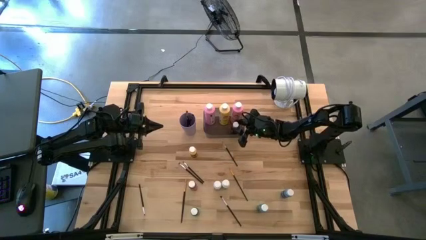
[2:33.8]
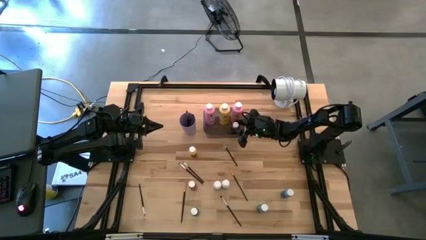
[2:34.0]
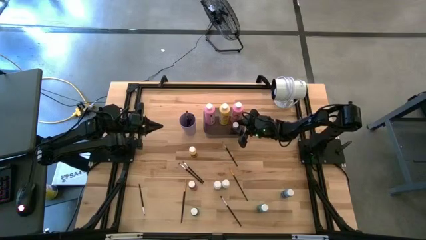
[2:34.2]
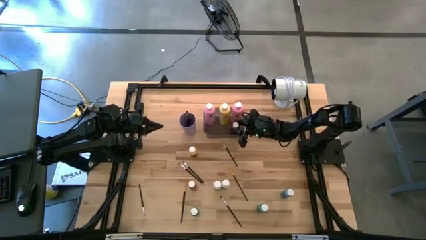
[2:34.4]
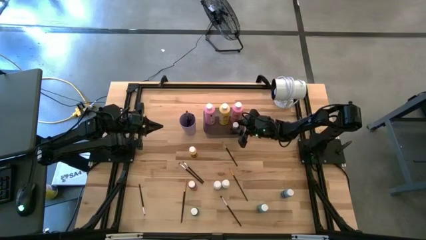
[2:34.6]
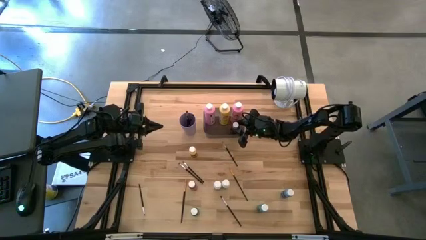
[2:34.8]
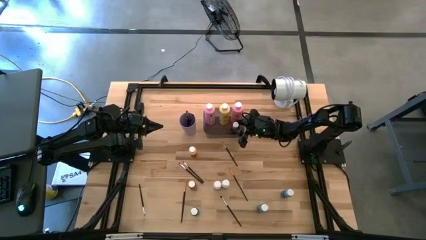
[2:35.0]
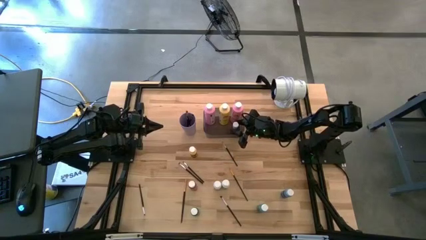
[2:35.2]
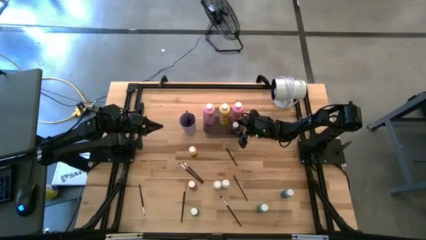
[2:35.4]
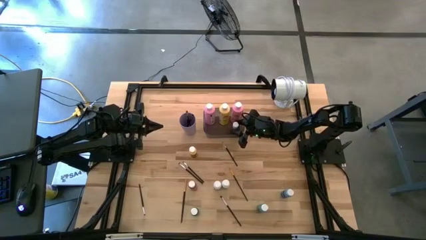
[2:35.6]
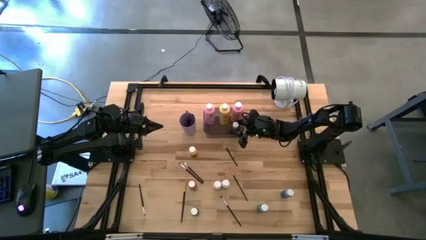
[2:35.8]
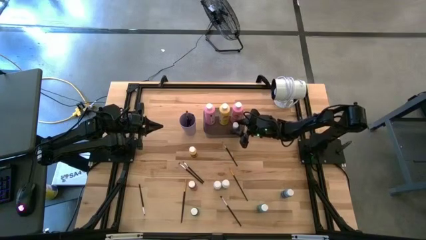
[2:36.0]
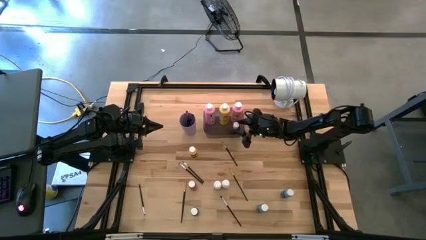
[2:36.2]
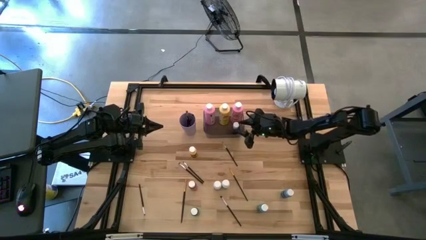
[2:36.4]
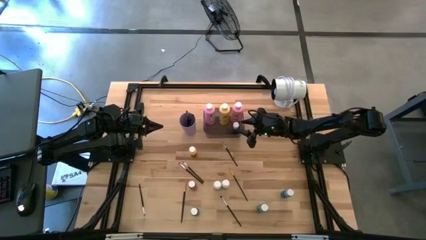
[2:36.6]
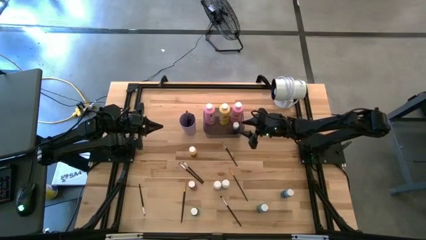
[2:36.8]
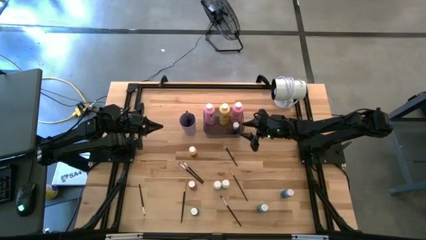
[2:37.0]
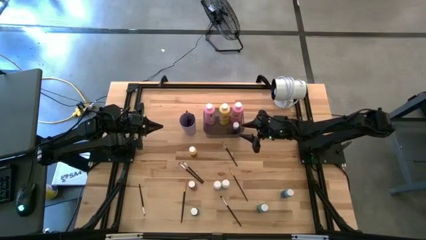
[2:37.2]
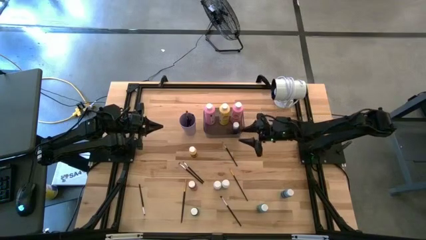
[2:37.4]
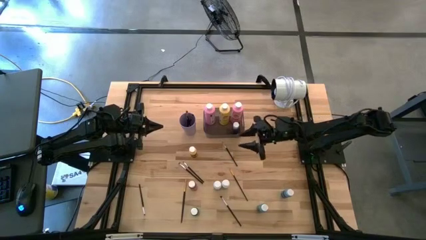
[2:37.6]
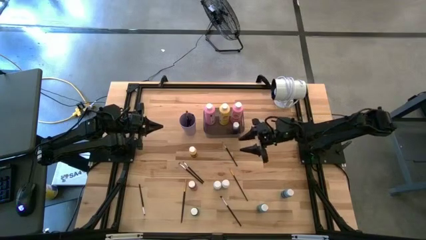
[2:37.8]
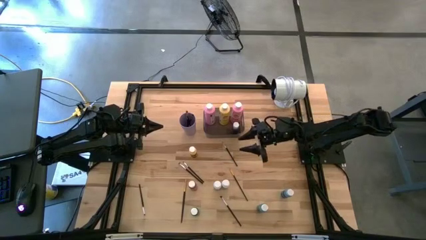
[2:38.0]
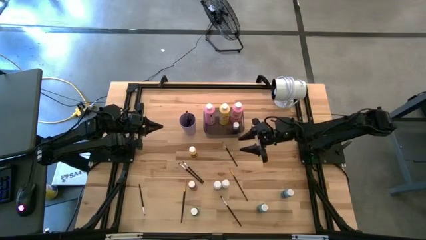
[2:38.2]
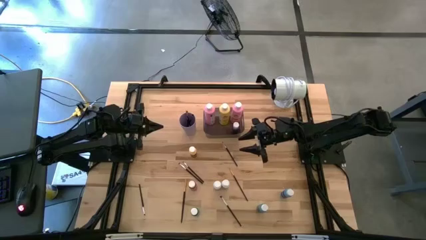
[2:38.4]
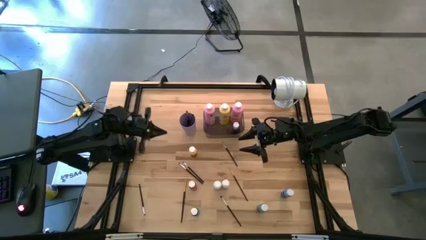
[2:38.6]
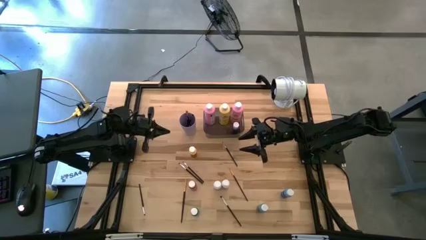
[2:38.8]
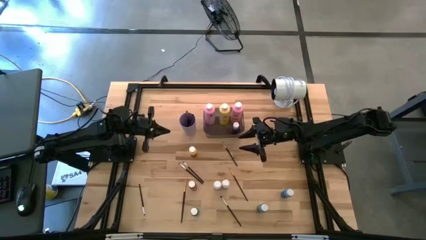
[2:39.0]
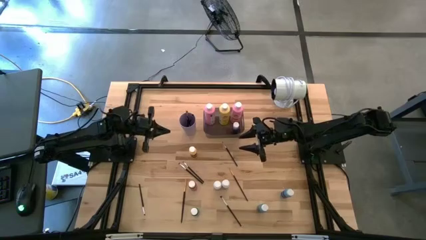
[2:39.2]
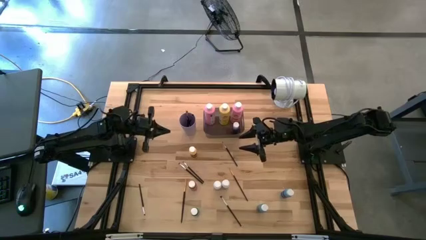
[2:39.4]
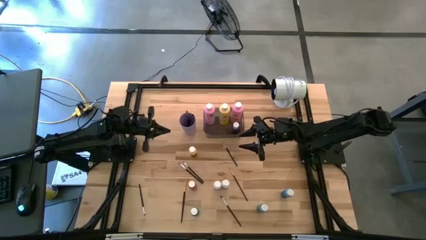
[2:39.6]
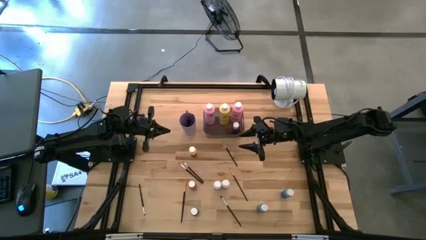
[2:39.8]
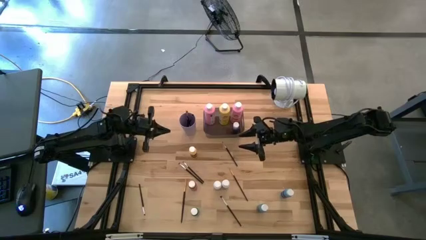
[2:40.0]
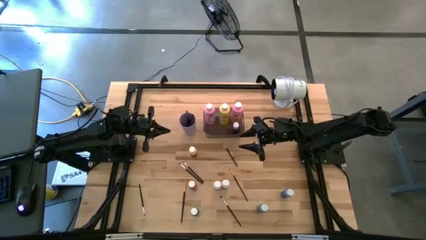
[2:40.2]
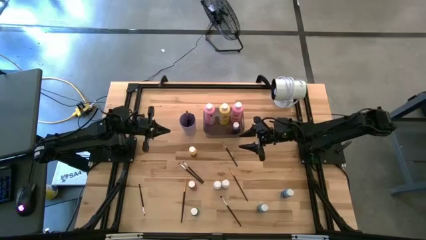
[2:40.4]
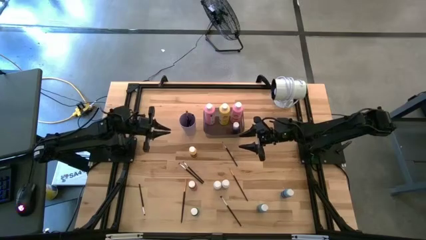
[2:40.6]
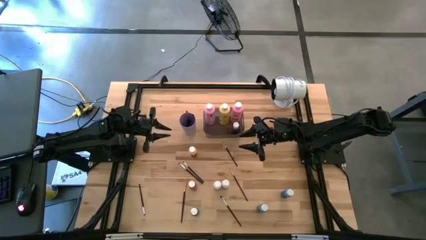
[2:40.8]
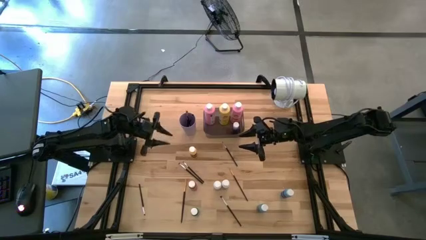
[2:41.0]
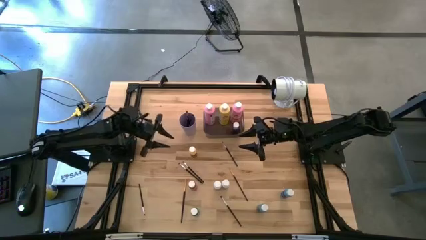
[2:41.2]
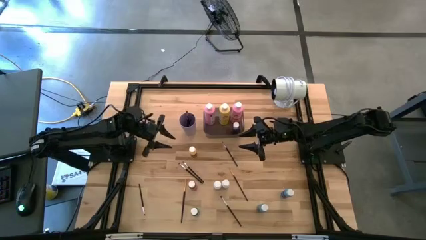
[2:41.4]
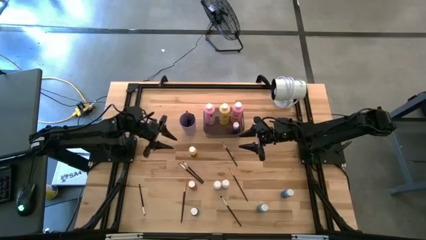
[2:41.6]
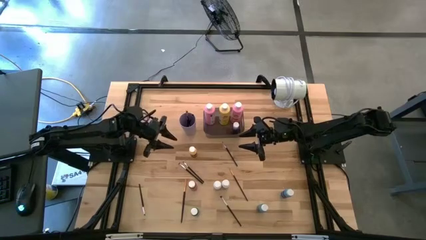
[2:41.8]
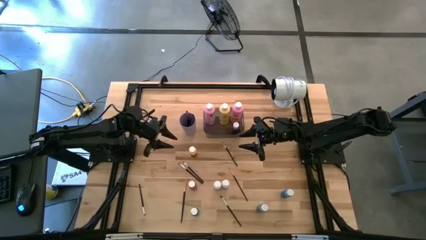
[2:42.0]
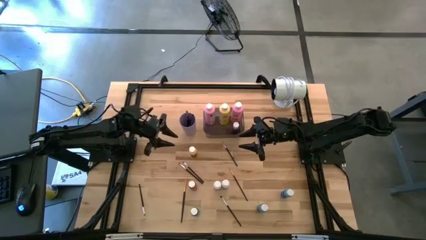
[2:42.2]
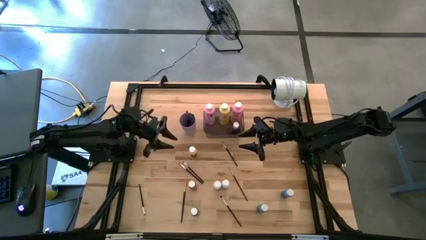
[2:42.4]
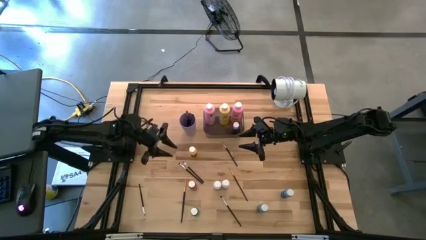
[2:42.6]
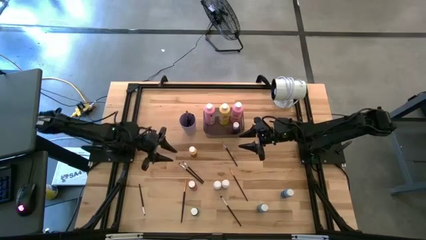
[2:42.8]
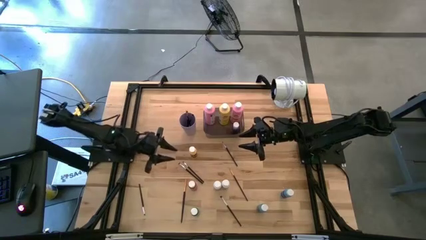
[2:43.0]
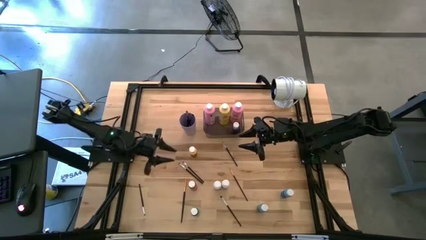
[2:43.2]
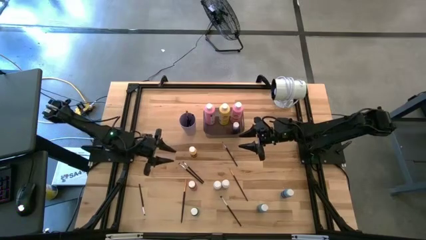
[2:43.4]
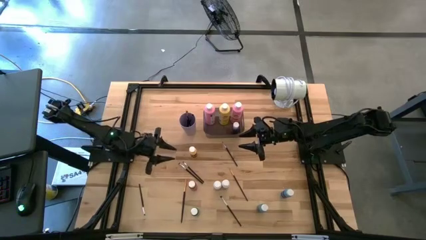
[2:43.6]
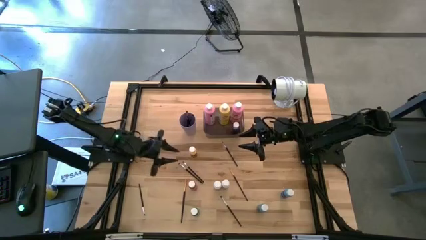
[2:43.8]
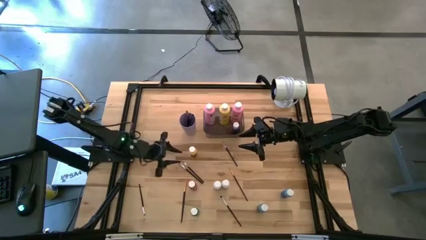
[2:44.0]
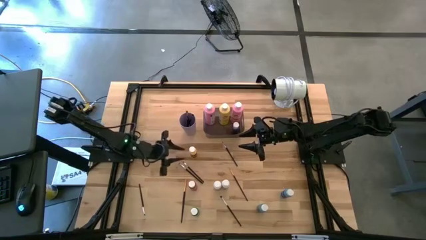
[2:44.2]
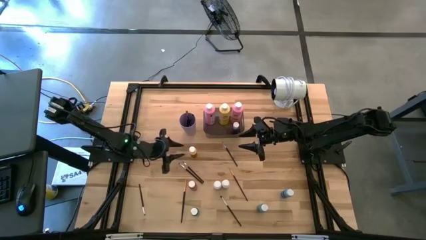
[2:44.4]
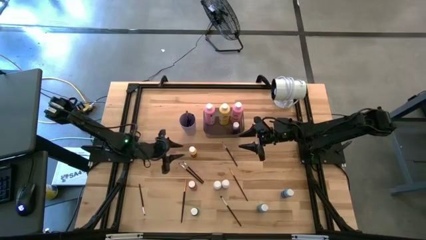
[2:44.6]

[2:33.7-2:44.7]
Task: Pick & Place Paint Supplies
Put the small yellow paint bottle into the gray bin

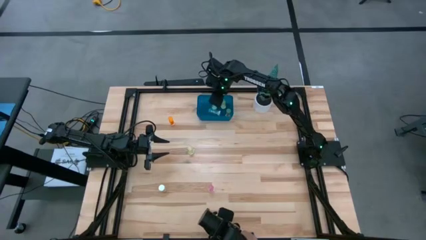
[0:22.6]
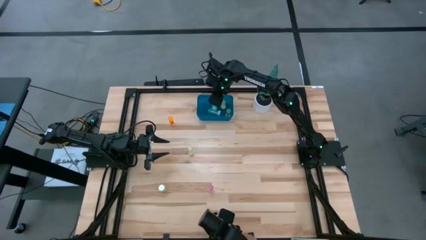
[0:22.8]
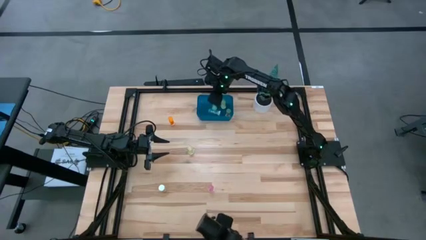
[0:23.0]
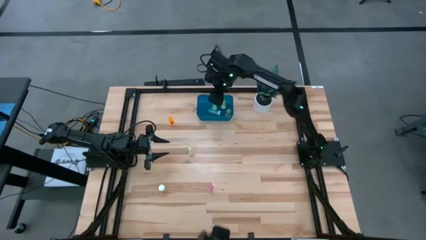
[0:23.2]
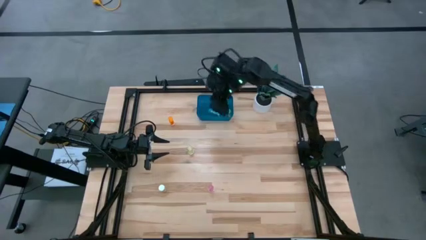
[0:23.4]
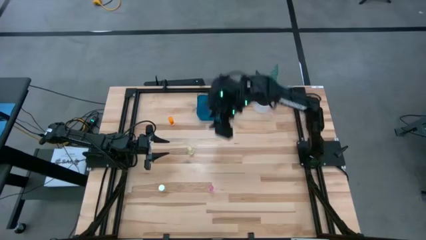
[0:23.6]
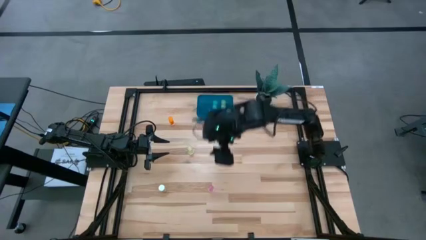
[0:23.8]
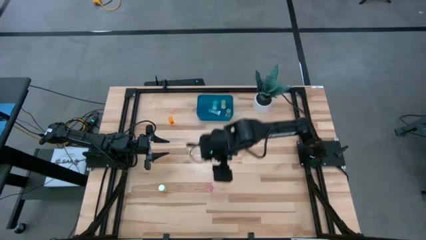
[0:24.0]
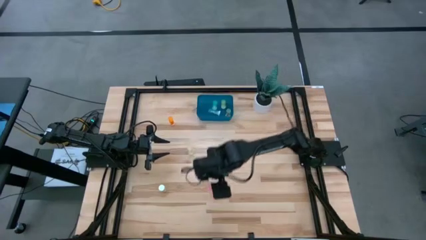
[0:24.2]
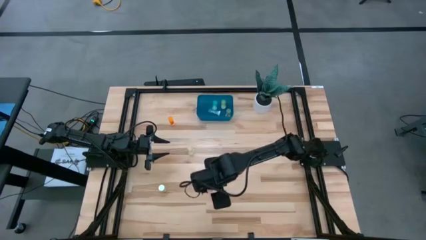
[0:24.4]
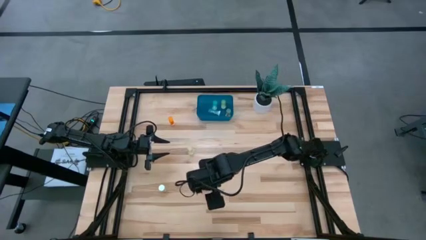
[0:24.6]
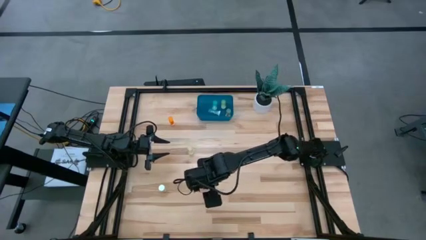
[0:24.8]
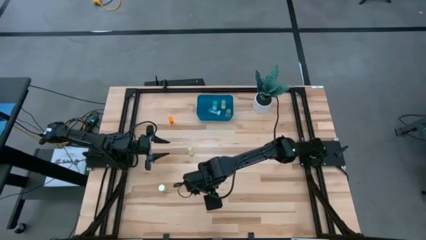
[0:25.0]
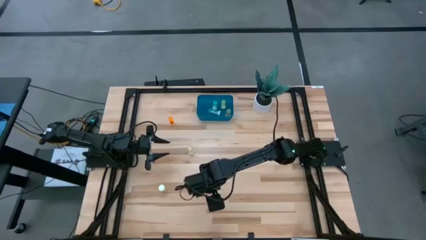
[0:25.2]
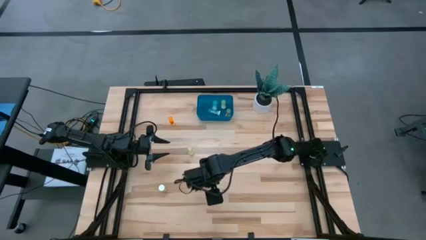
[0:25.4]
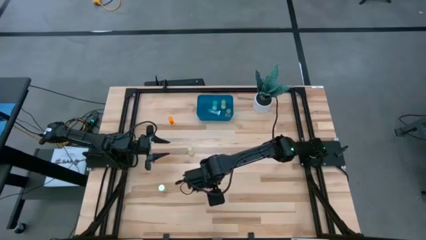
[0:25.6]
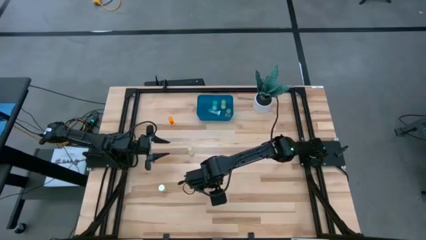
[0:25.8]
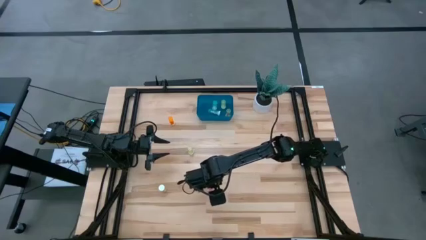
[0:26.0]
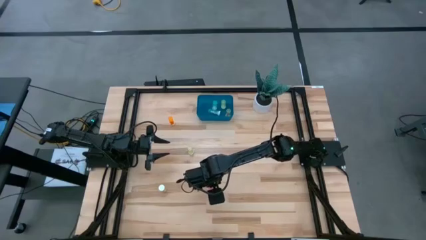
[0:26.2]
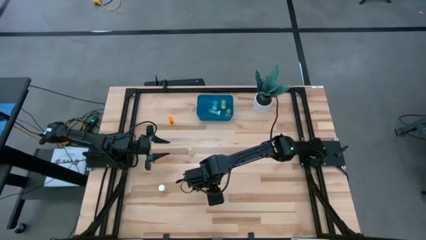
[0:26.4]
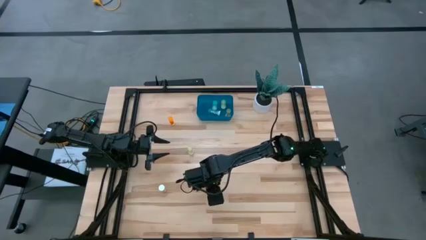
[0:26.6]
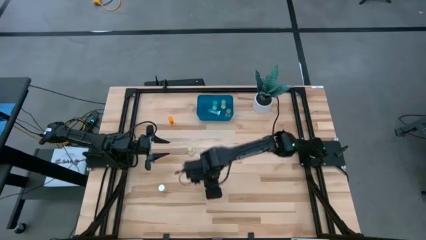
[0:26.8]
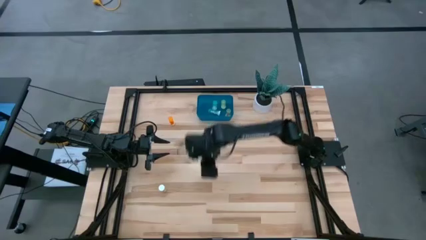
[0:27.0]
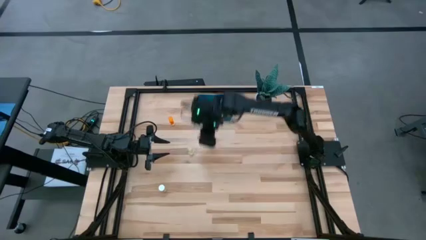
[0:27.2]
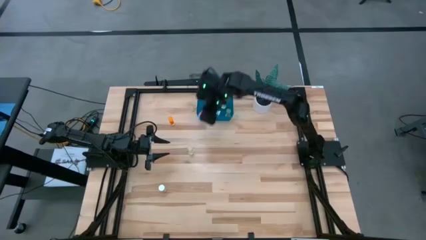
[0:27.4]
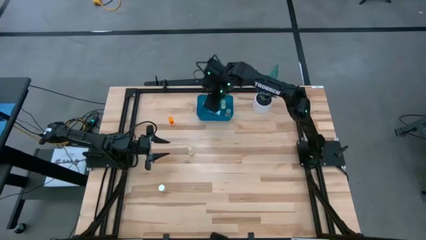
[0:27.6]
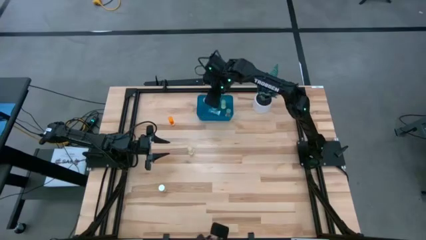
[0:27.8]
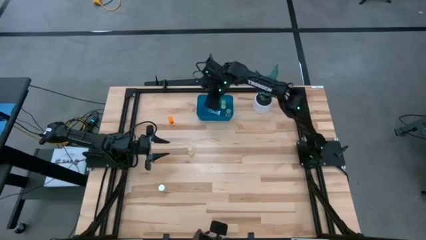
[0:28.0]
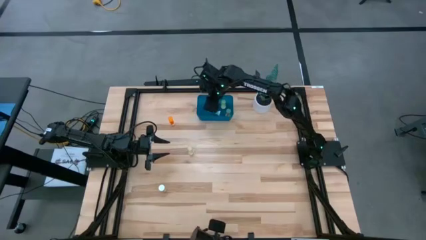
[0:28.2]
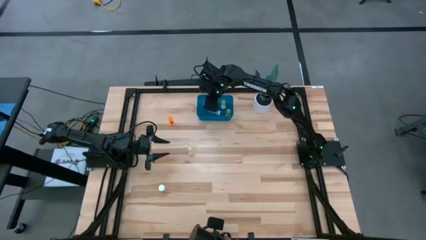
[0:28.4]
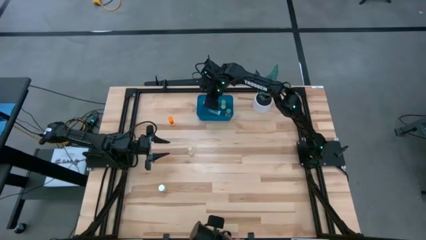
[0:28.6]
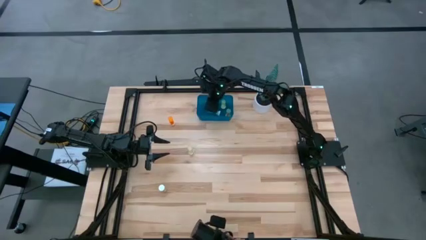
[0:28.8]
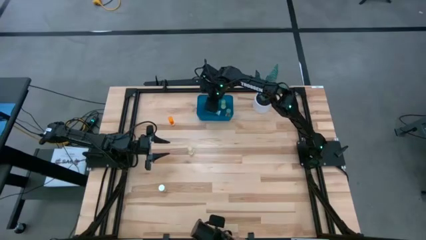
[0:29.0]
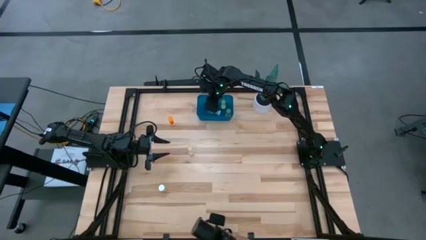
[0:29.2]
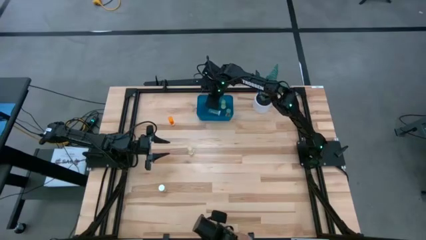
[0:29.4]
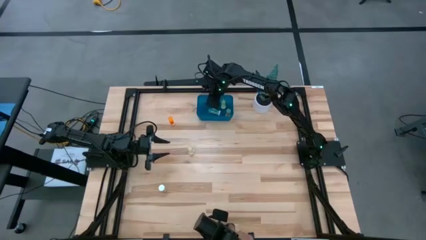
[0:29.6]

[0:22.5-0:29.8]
Task: Pick and place pill bottles into a basket
Put the pink pill bottle into the blue bin
